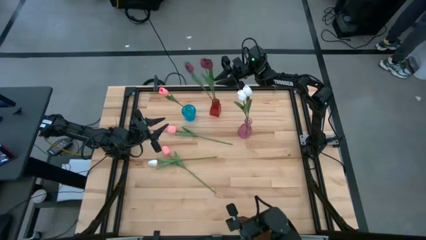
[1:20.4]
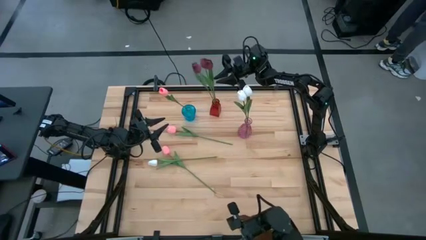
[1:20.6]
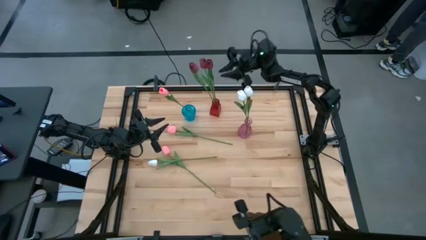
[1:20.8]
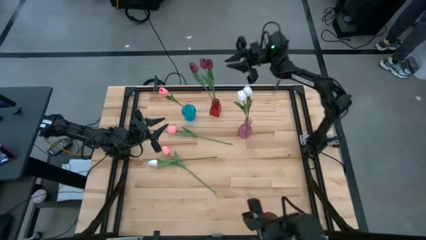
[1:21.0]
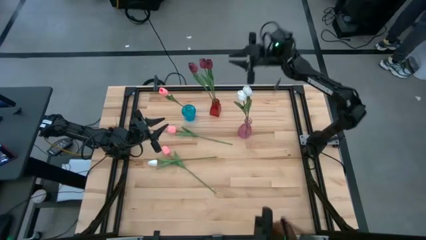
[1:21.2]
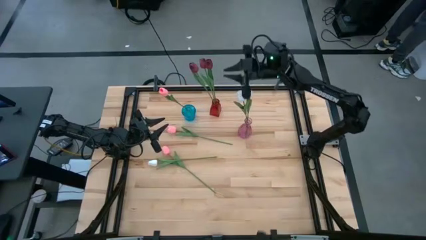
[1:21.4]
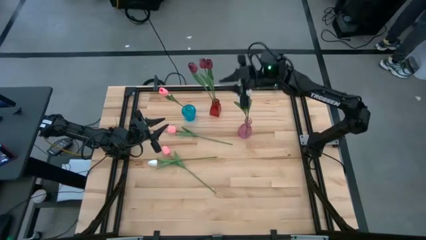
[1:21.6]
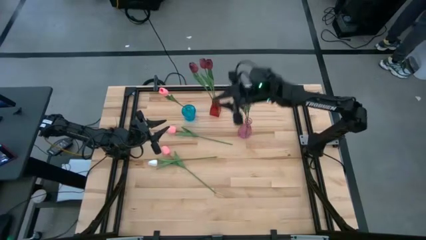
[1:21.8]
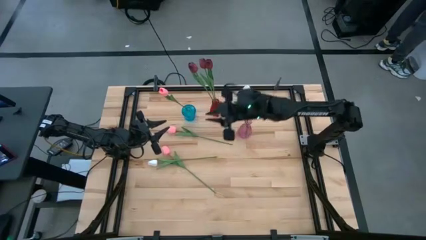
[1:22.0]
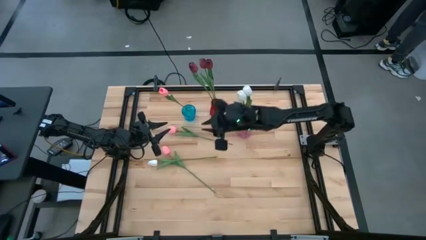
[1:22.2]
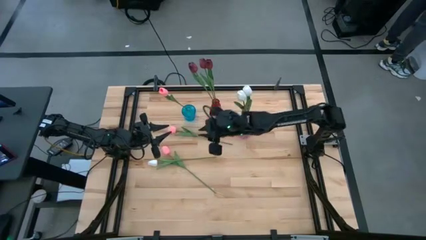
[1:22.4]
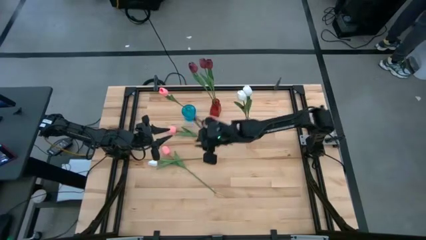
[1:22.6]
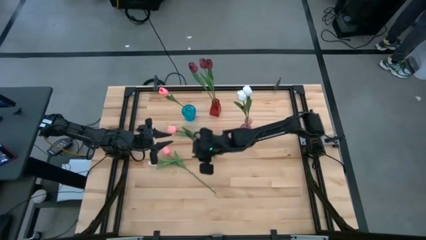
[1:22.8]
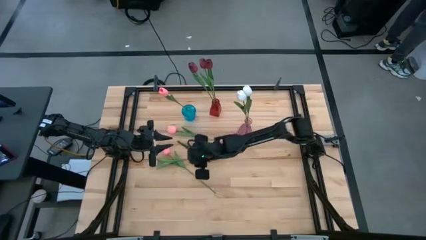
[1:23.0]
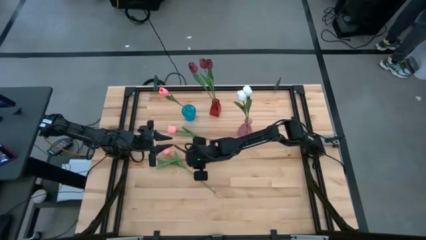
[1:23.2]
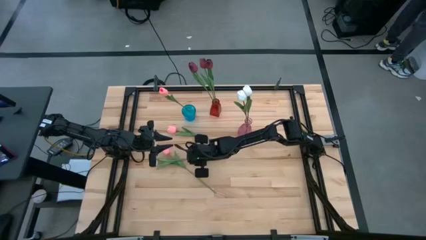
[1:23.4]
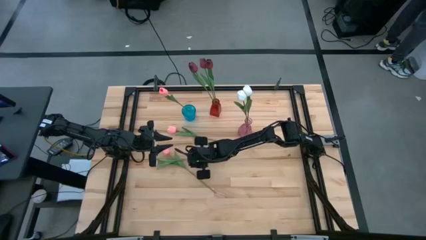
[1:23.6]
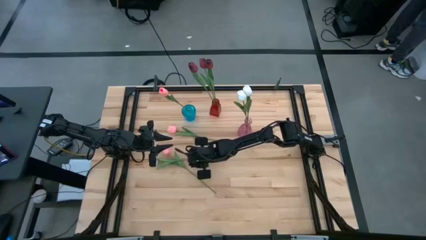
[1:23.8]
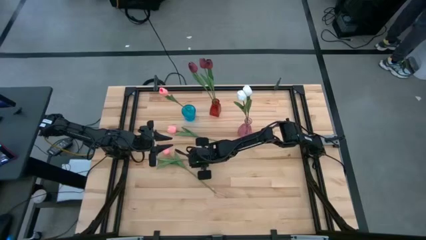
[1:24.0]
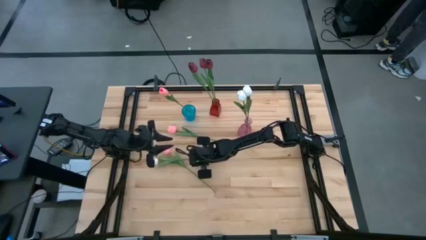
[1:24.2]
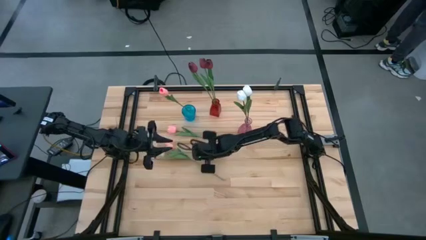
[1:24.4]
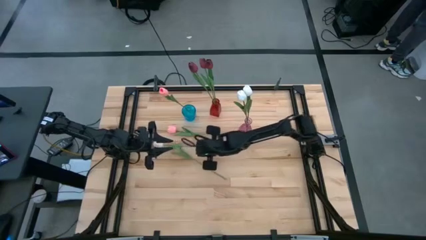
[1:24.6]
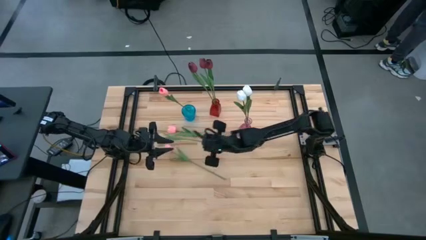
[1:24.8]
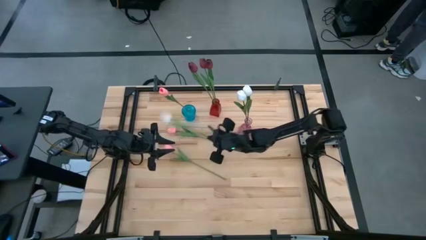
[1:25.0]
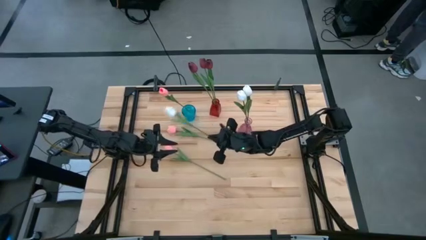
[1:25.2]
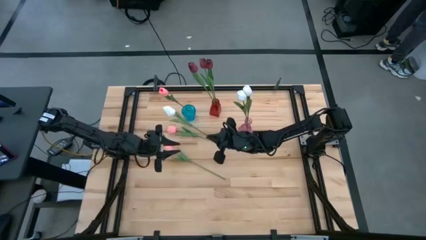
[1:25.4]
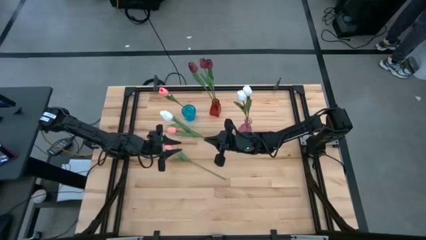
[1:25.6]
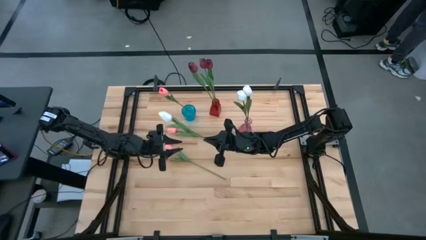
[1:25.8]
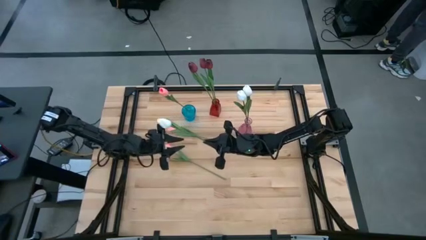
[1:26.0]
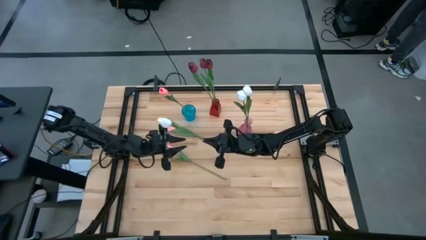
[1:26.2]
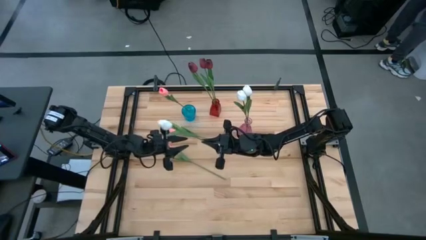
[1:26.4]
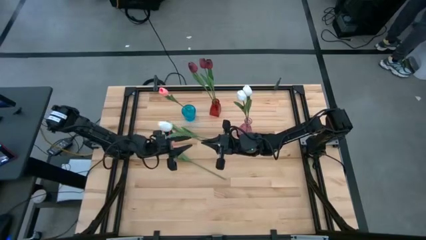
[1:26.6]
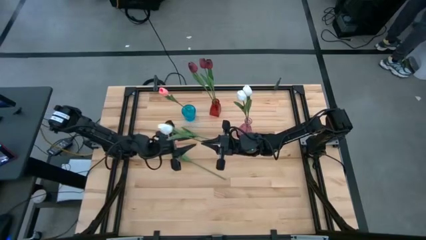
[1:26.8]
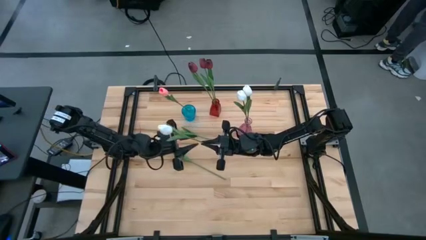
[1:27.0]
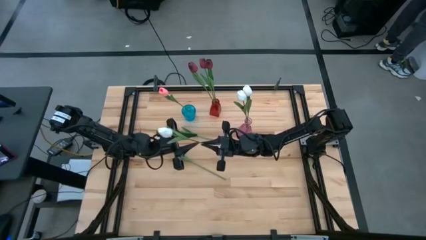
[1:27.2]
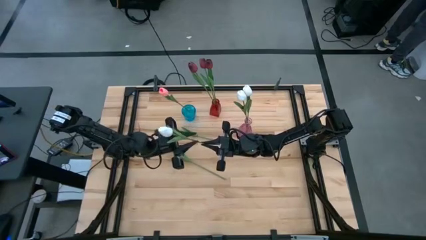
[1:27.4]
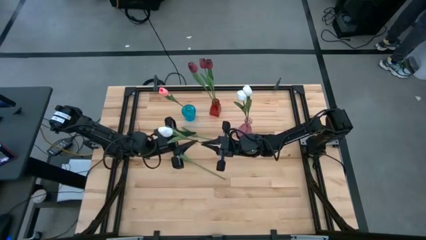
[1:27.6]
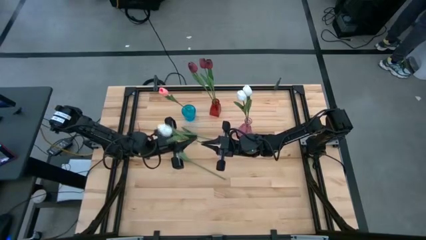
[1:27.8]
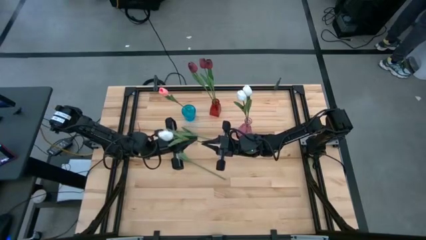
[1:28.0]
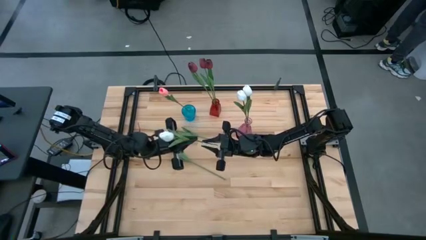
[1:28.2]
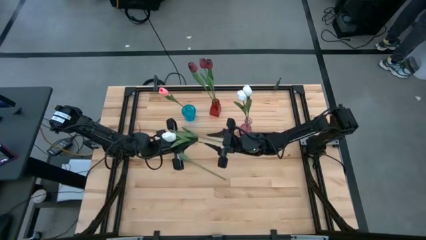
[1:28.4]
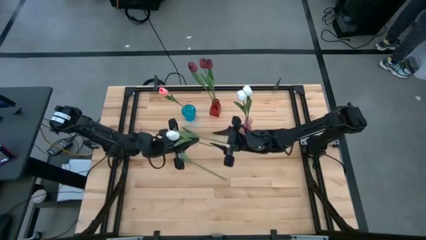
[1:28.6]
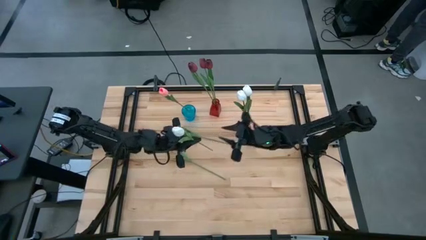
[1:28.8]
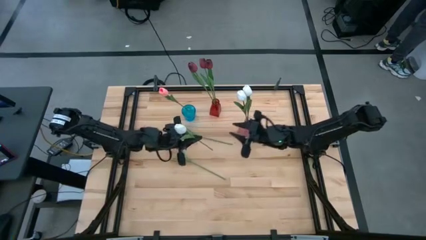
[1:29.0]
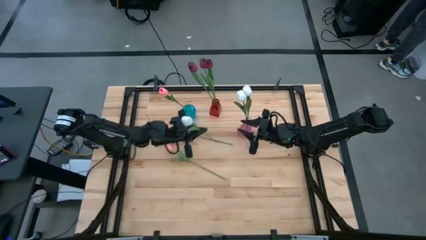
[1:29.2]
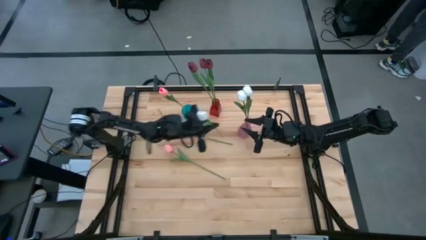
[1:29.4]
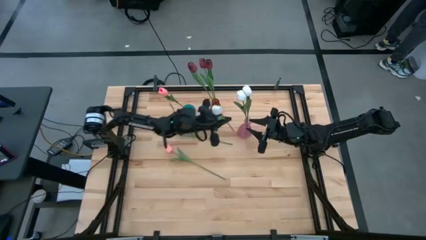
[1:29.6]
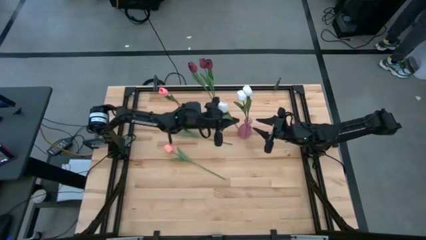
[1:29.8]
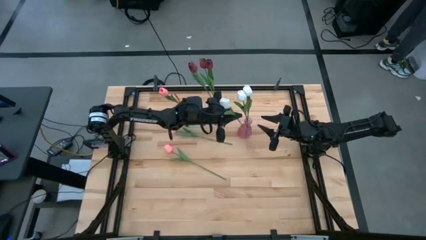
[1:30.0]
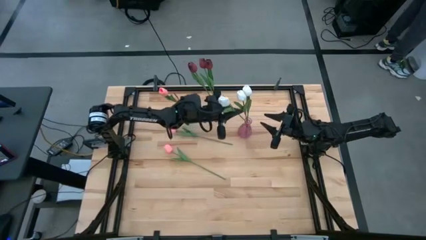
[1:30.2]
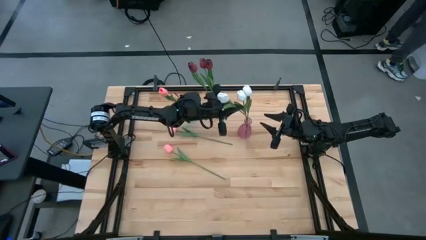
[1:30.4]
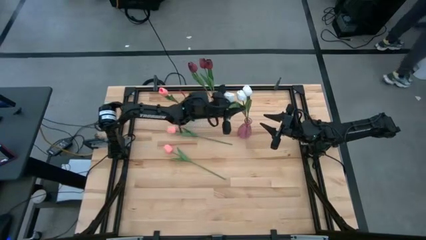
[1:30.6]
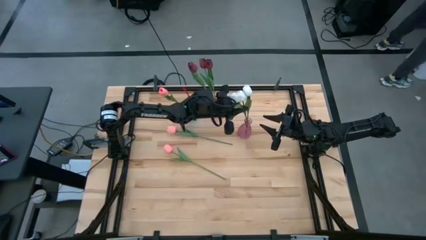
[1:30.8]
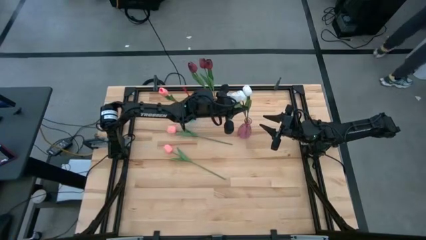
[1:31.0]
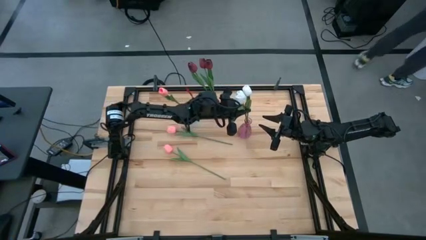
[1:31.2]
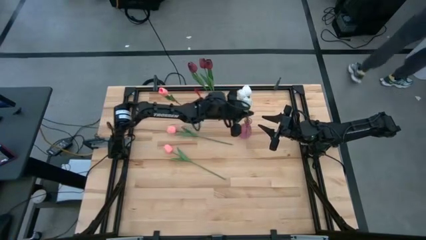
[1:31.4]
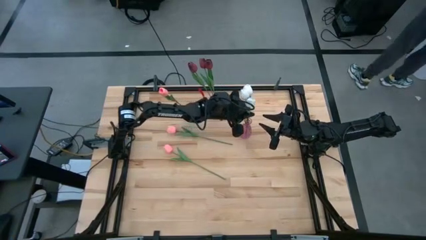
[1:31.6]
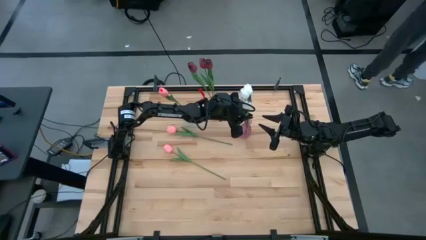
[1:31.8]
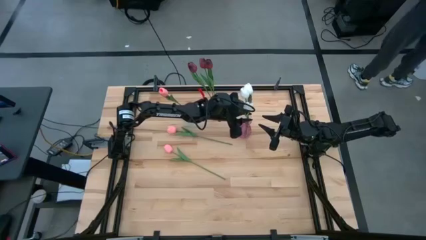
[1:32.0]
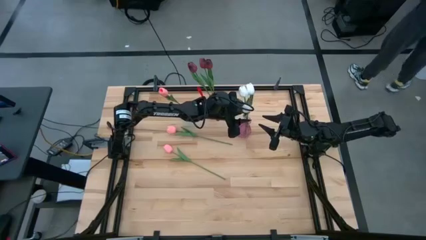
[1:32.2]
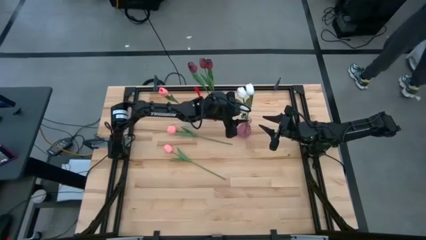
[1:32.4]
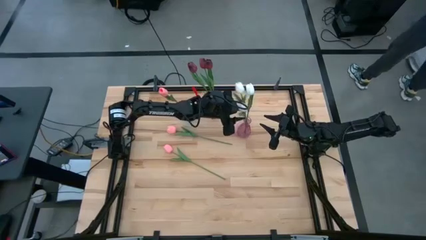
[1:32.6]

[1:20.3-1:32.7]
Task: Sort flowers into vase by color
Put the white flower into the pink vase

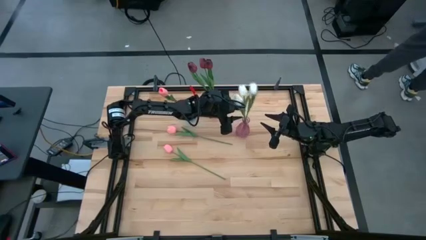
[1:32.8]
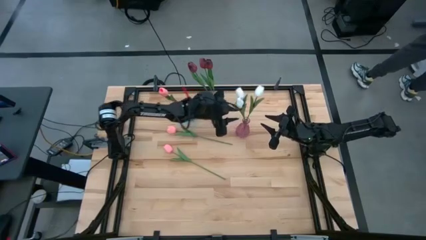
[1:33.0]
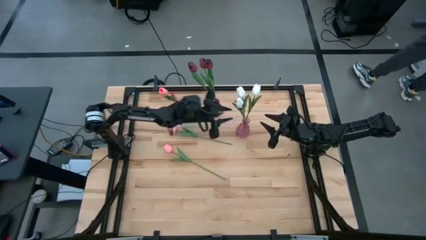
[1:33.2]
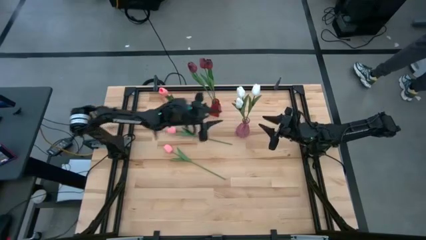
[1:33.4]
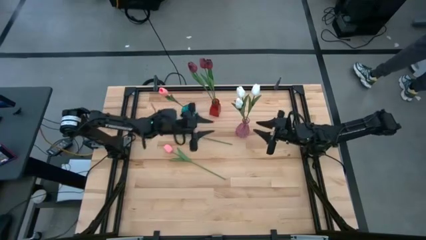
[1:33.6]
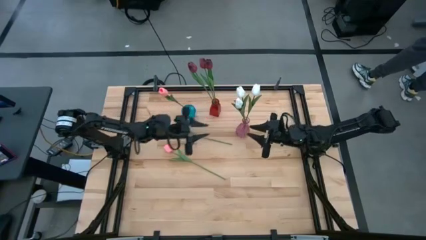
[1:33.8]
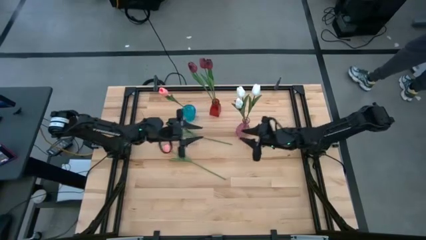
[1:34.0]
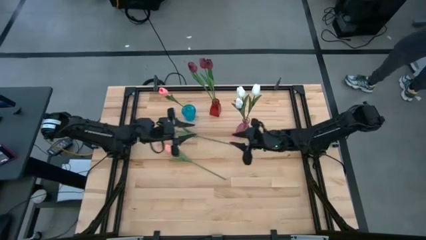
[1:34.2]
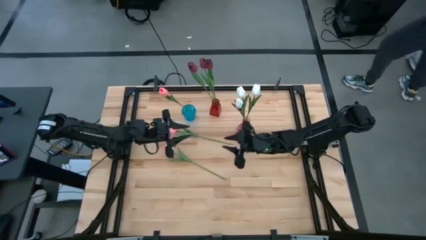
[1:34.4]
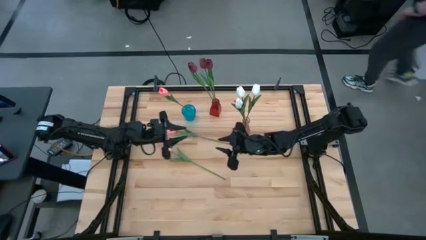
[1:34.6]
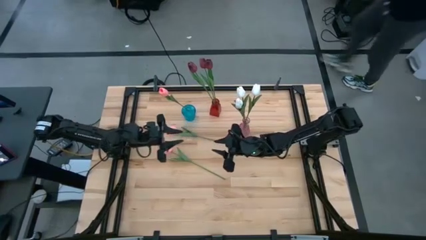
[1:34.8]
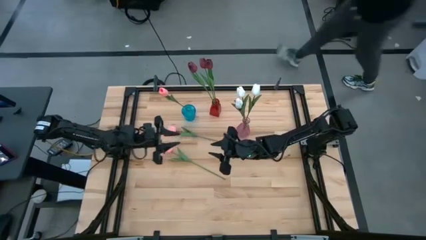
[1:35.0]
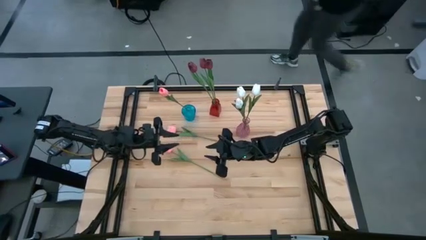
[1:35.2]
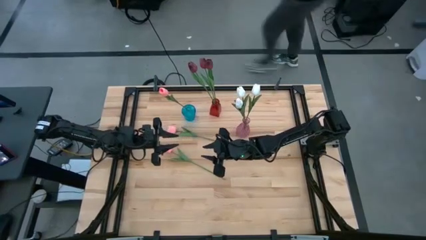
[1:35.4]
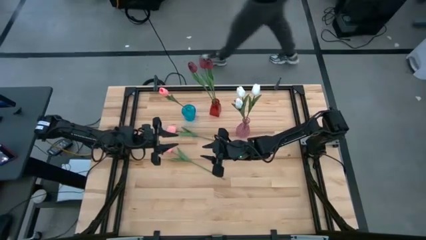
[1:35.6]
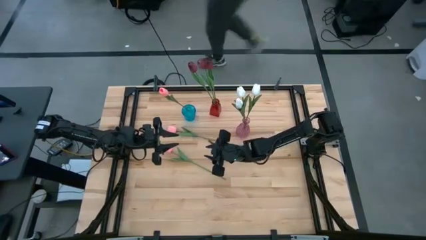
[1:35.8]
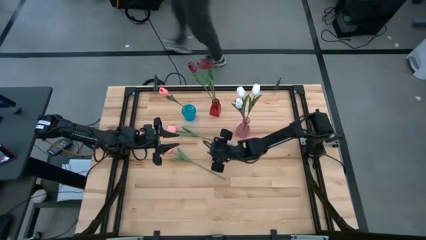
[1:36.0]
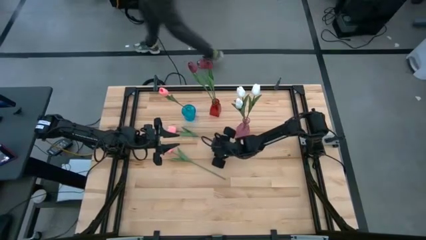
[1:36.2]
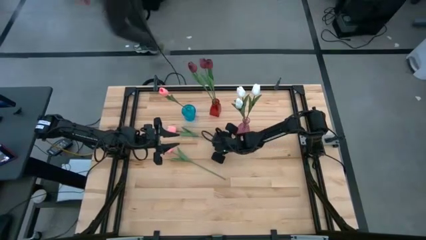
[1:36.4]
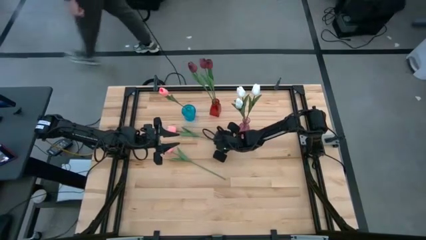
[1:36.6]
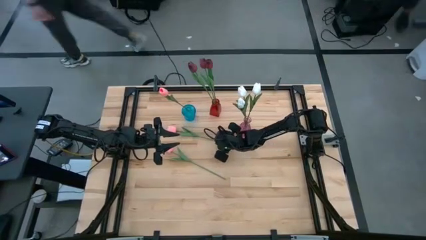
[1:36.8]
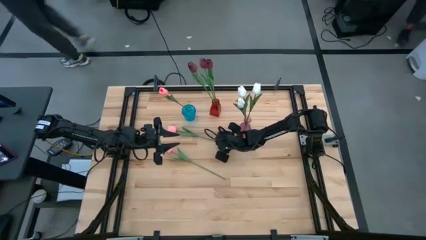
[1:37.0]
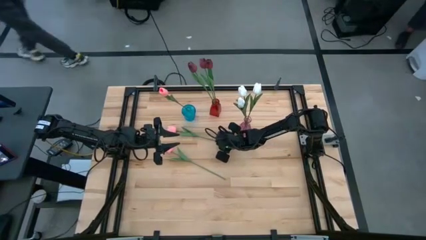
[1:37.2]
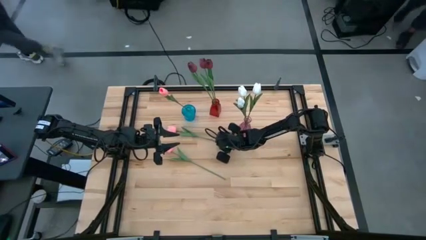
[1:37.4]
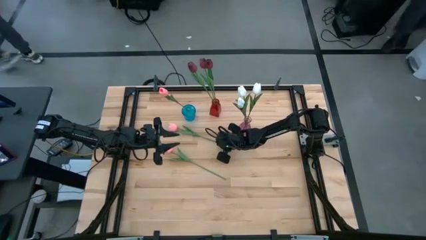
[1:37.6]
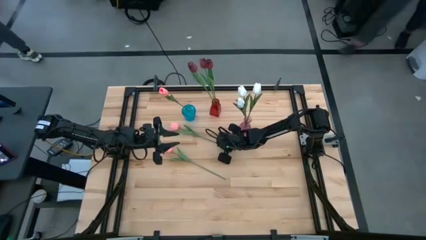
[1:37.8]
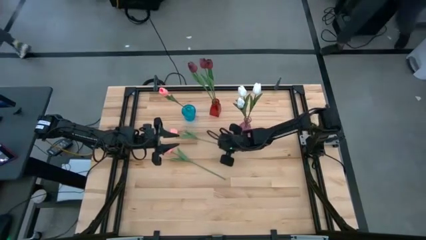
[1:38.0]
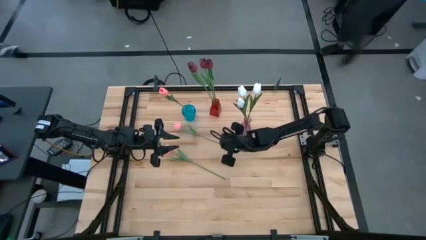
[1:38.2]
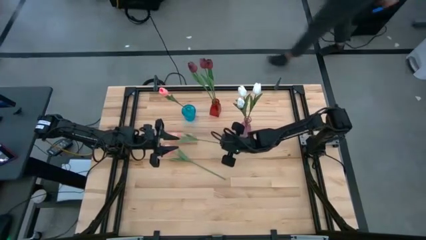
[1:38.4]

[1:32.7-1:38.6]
Put the top pink flower into the blue vase
